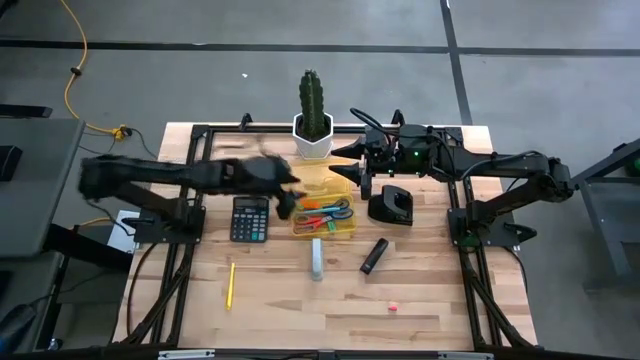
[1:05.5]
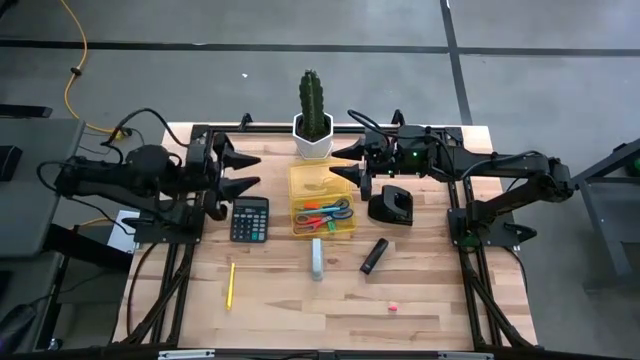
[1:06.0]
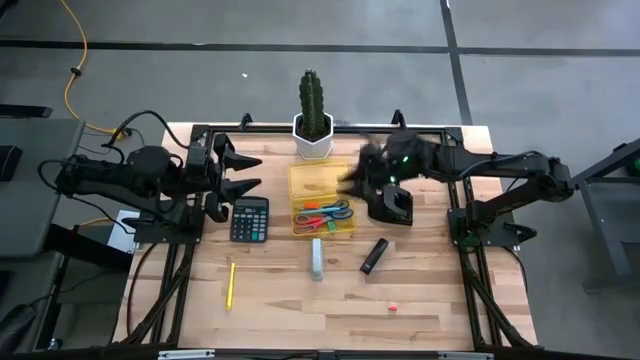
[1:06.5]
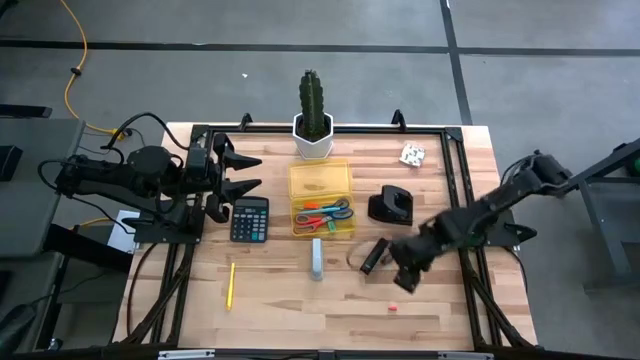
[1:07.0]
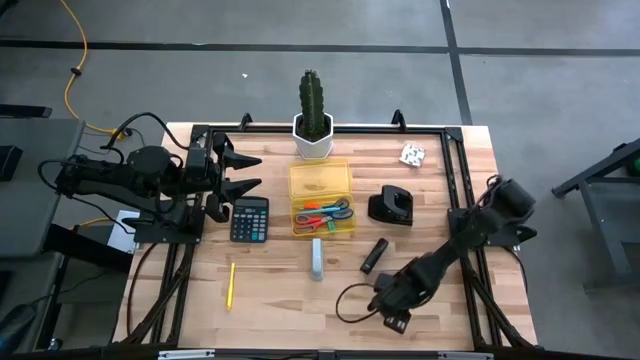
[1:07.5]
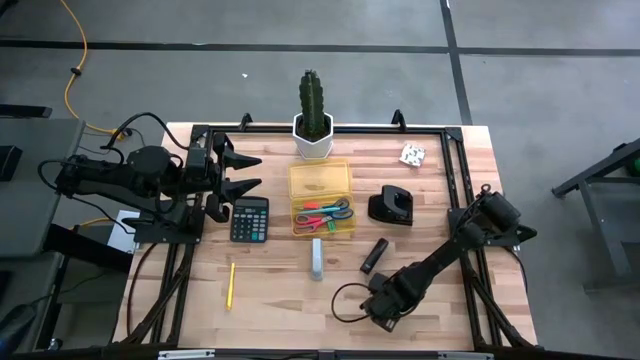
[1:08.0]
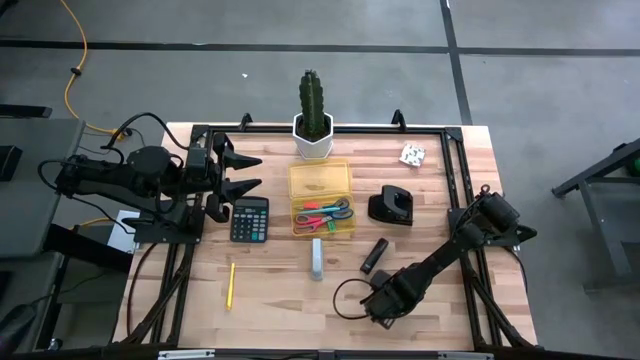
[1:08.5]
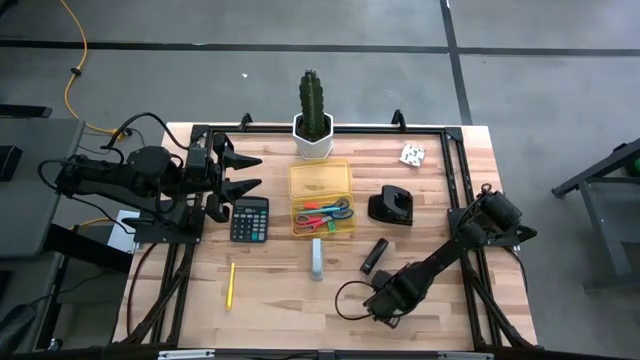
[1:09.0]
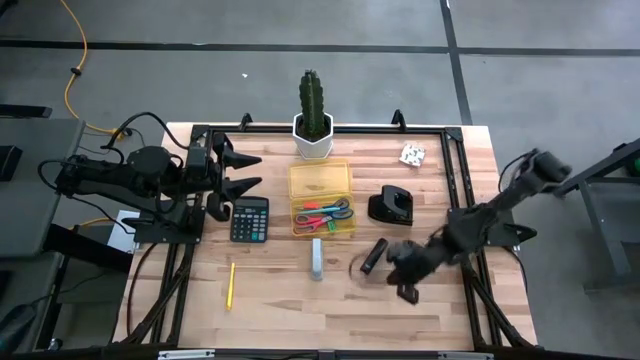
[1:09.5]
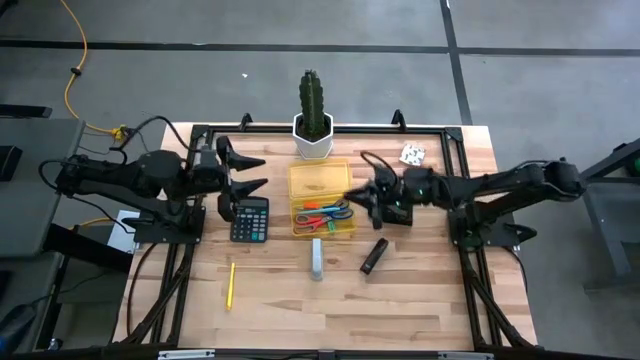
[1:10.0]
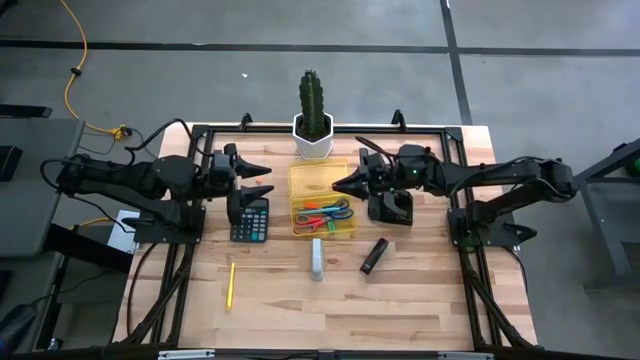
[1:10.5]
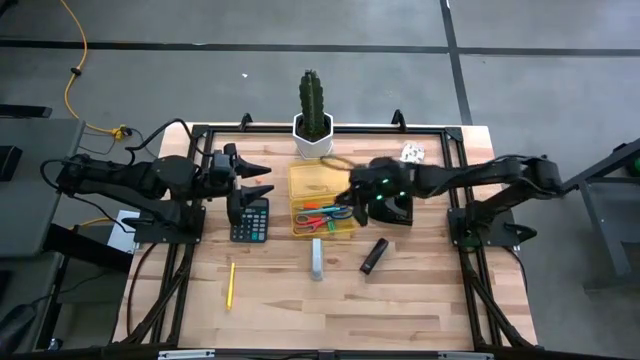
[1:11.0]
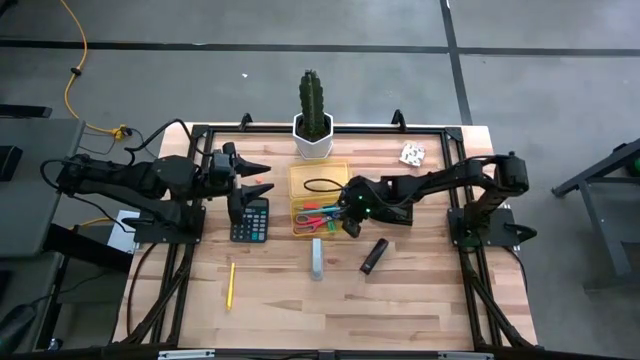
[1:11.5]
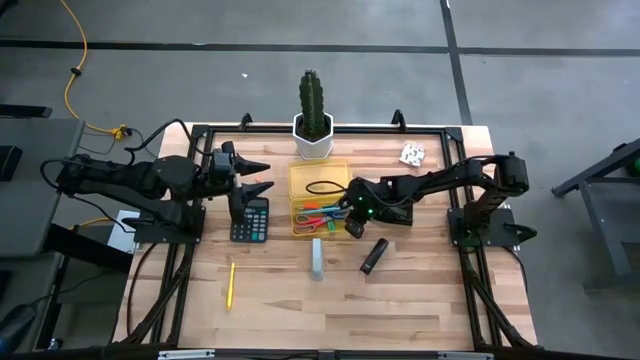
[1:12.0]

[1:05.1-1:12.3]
Task: Pick & place school supplies into a supply box
Put the pink eraser into the yellow supply box

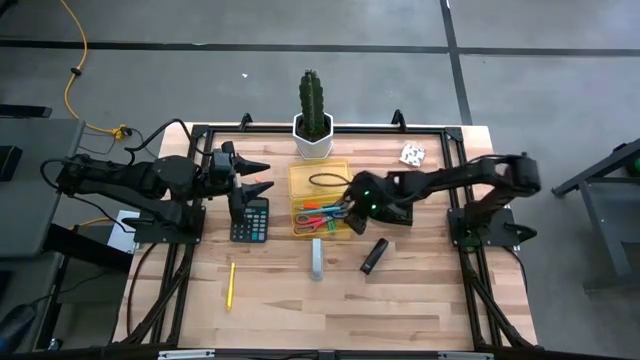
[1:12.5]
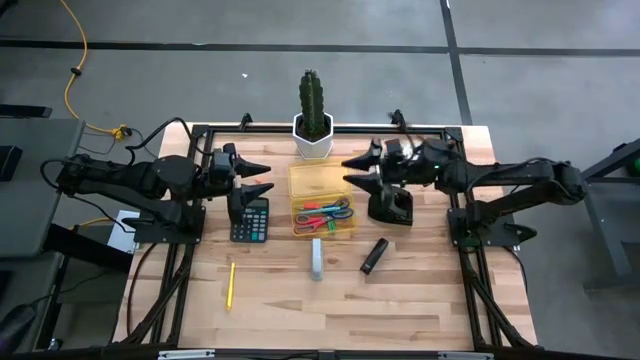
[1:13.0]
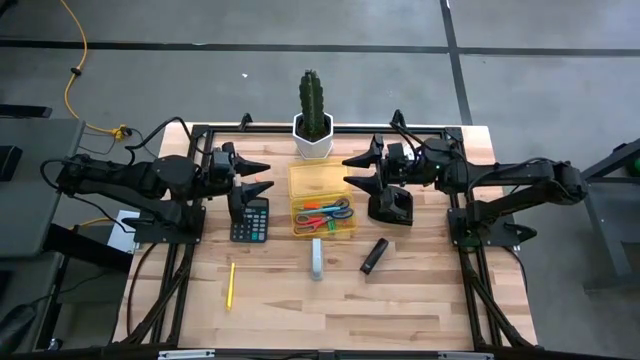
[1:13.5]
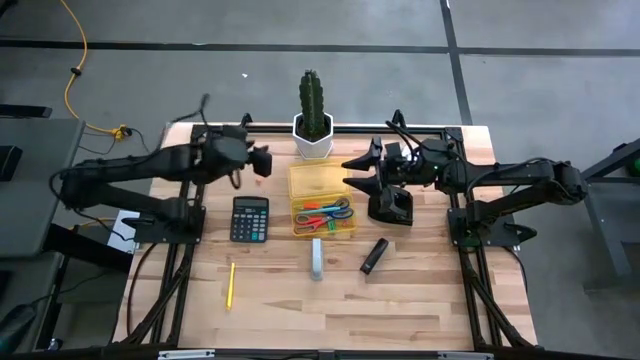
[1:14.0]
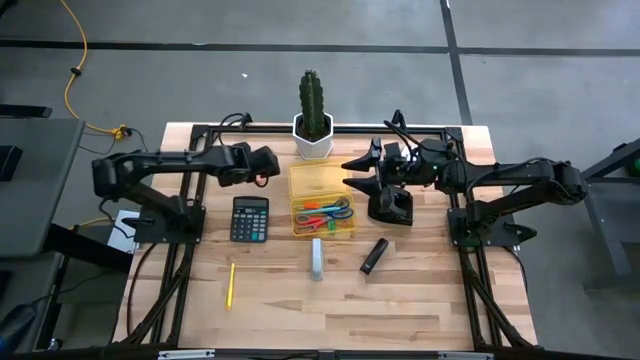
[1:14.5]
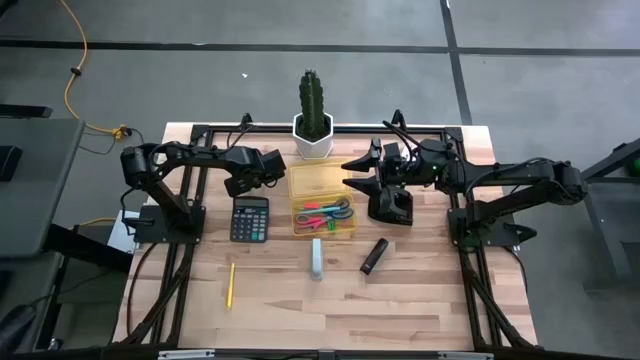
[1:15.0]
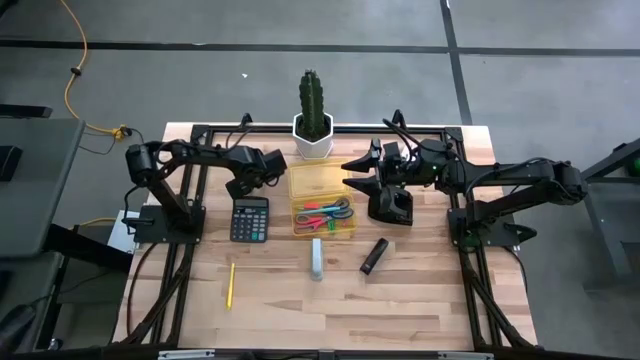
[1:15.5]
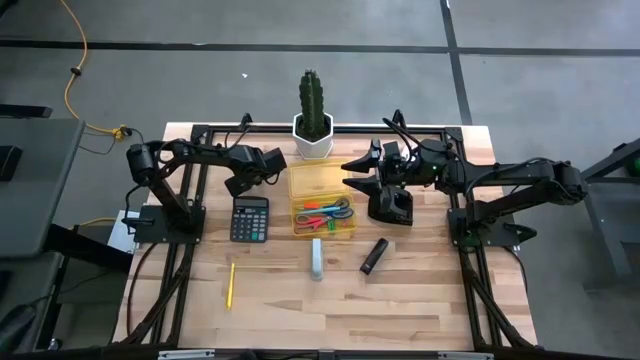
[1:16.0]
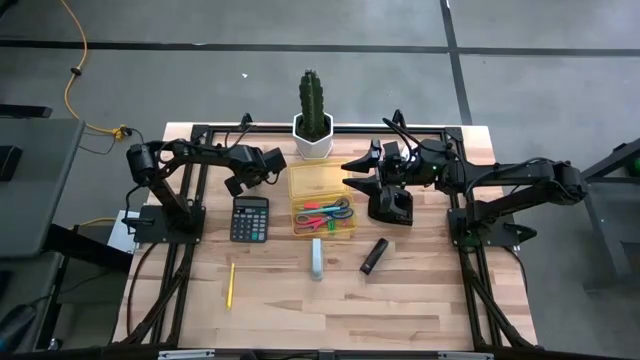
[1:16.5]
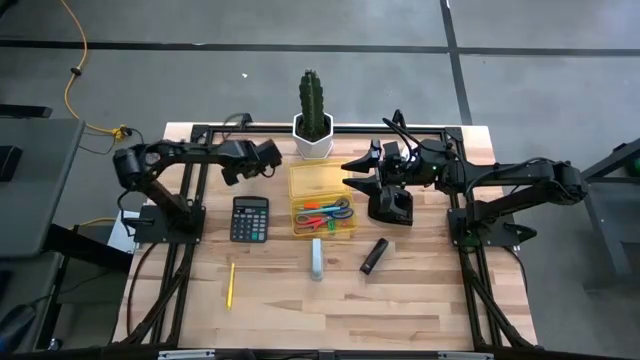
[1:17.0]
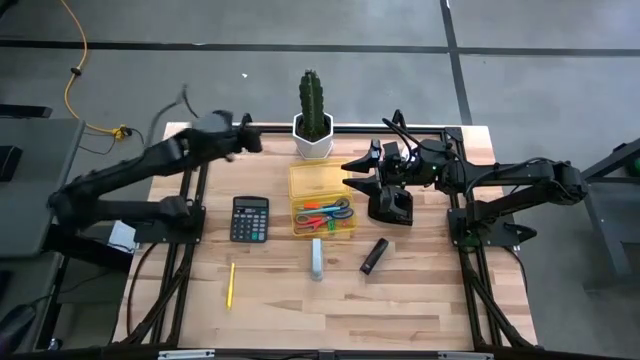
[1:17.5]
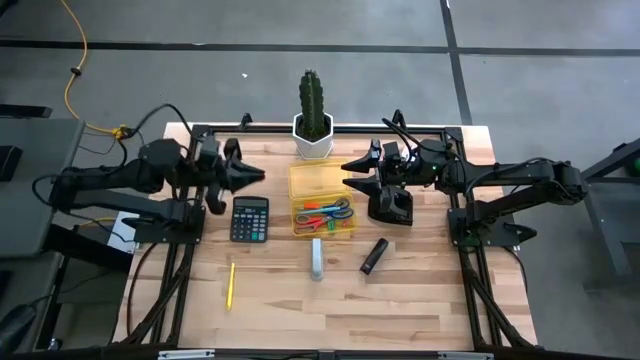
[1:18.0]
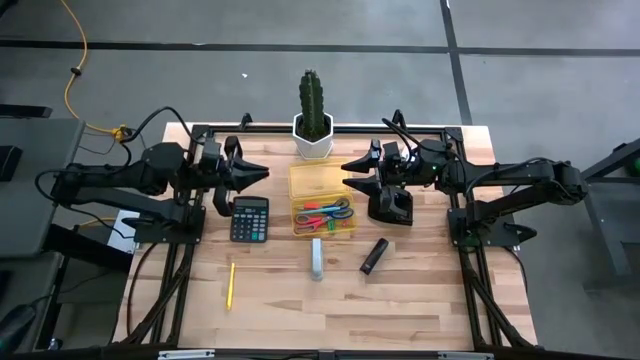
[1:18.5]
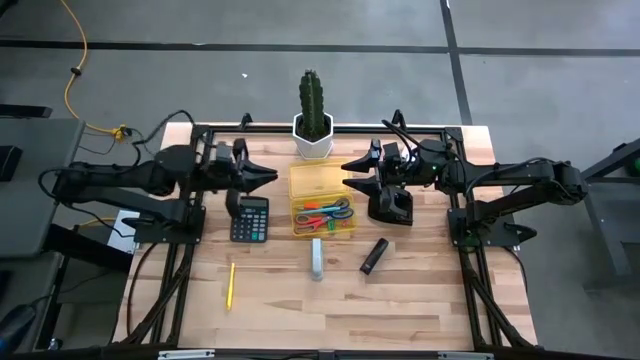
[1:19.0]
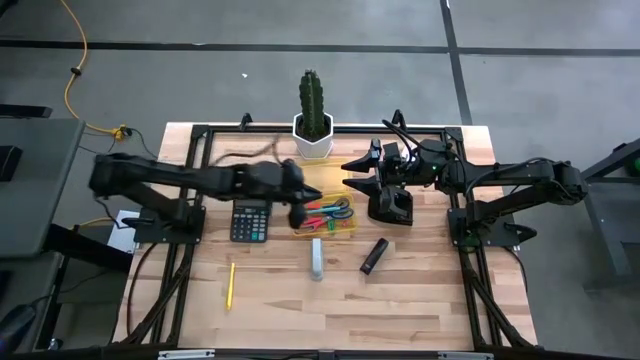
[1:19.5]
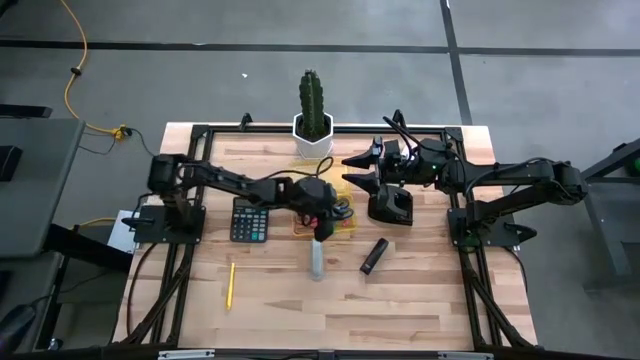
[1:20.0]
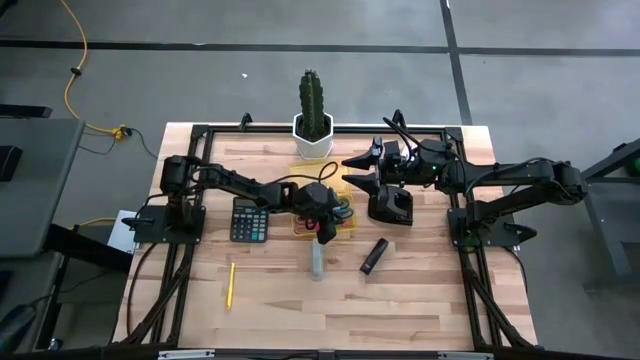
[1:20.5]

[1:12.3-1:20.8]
Put the orange eraser into the yellow supply box

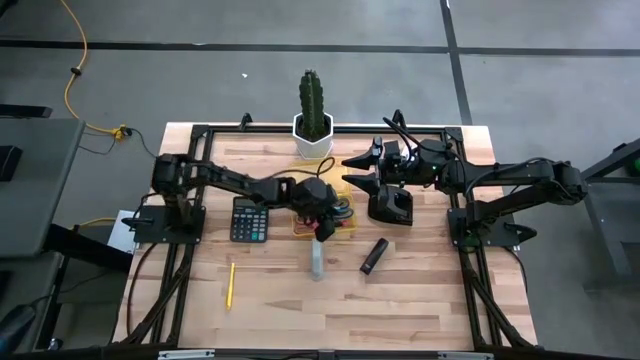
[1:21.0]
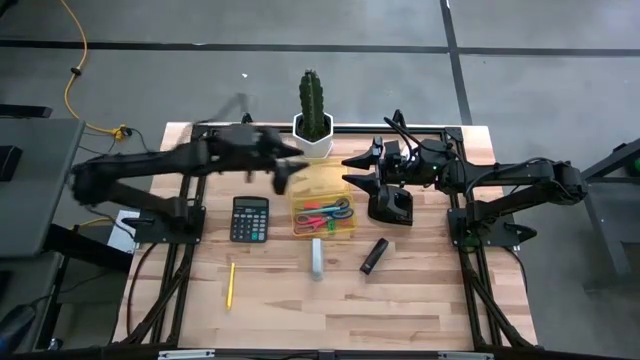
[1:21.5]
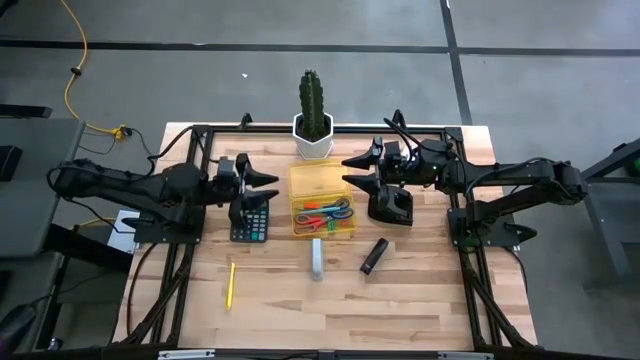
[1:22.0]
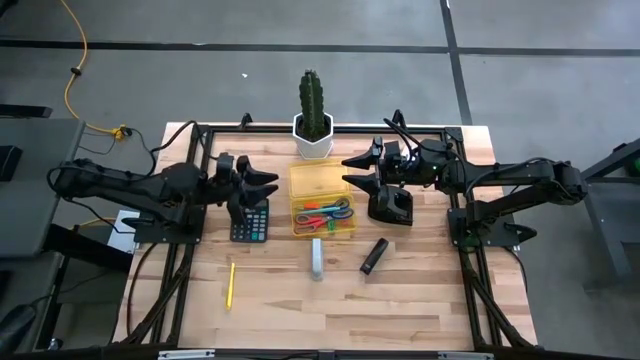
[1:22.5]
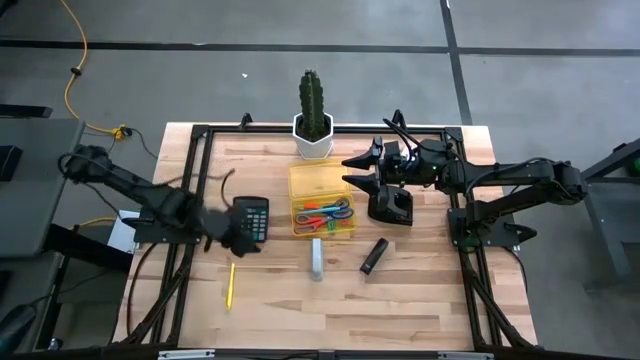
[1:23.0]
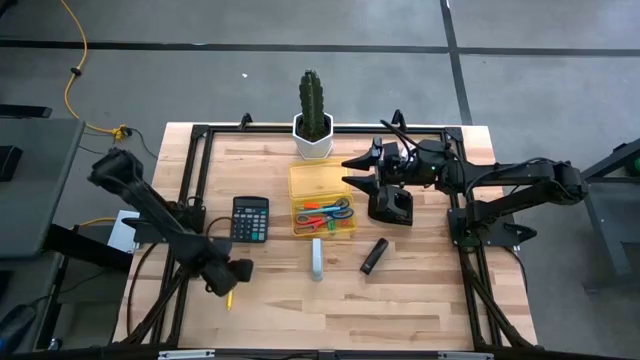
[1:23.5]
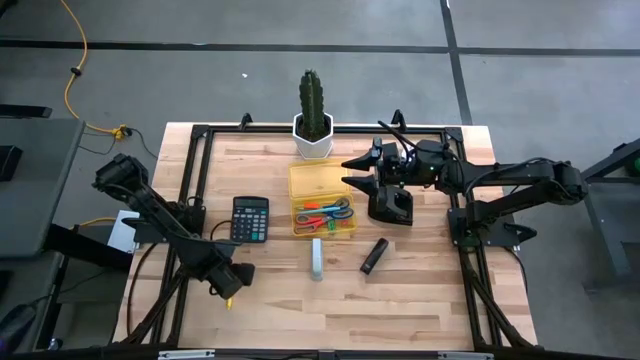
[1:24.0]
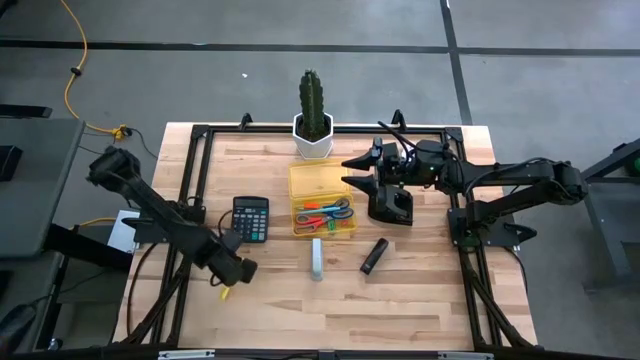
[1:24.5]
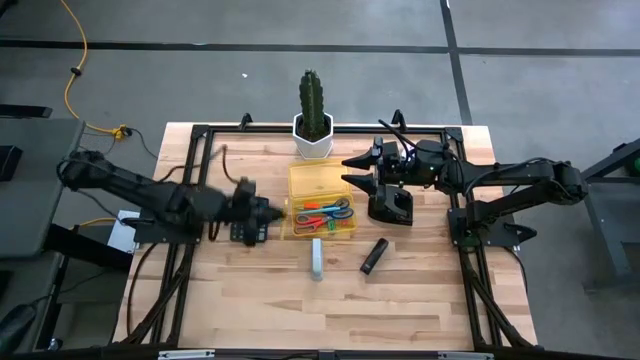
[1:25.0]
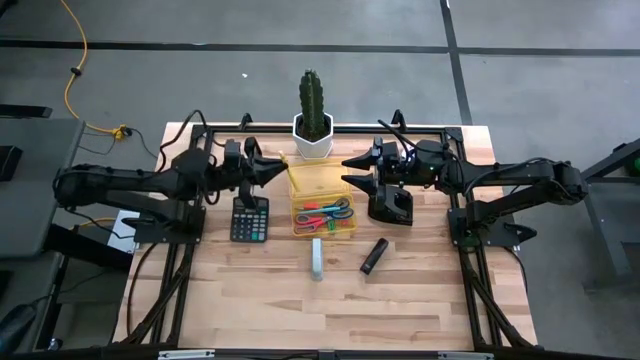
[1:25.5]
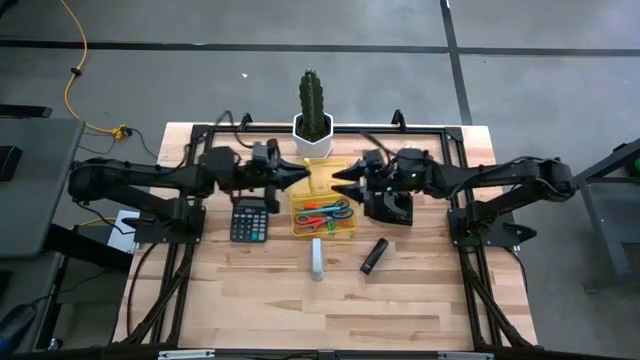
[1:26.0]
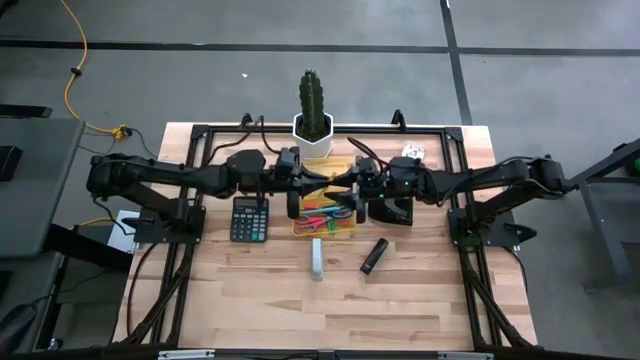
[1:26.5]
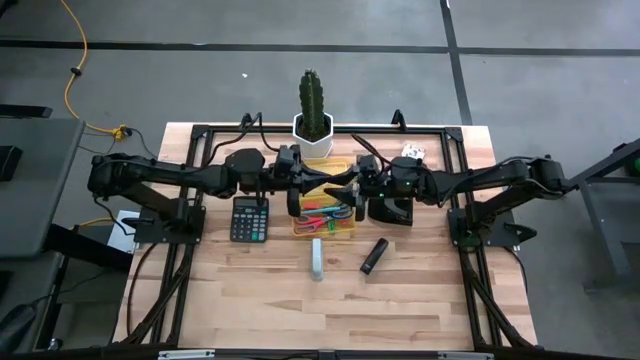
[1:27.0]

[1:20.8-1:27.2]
Put the yellow pen into the yellow supply box

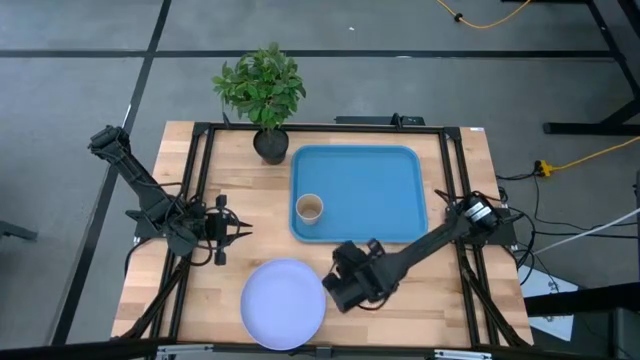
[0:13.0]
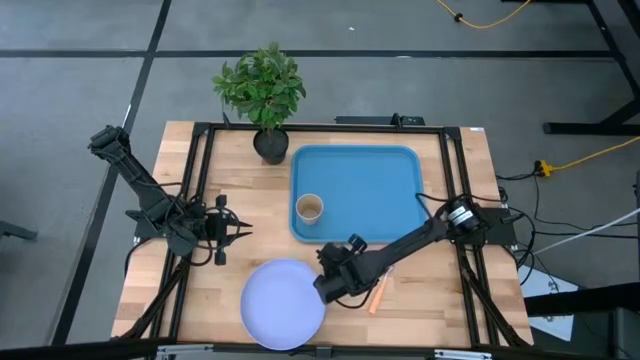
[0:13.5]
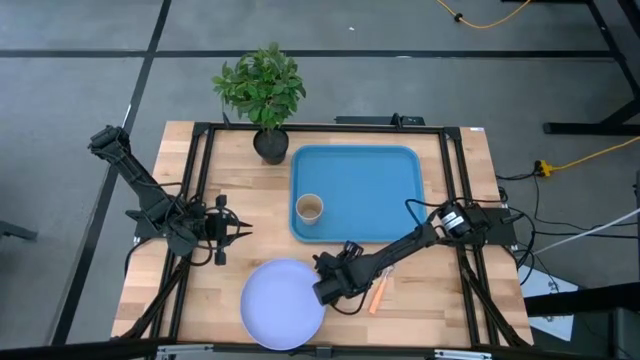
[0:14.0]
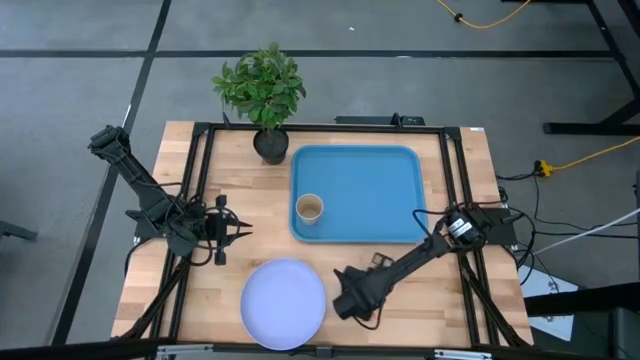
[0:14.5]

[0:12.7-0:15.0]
Task: Pick and place plate/cup/fork/spoon on tray
Adjust the spoon
